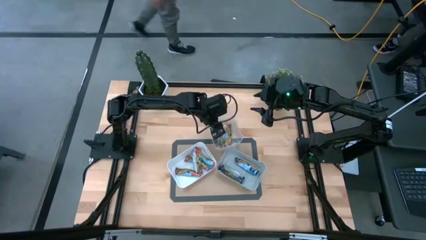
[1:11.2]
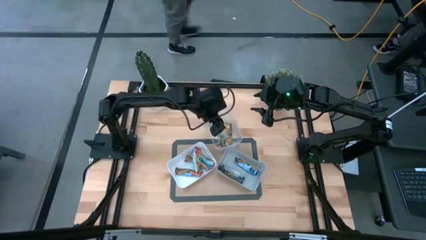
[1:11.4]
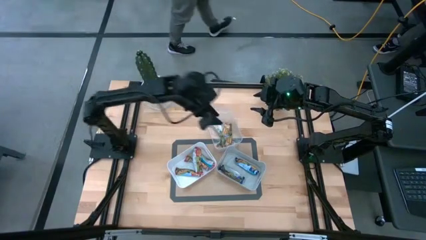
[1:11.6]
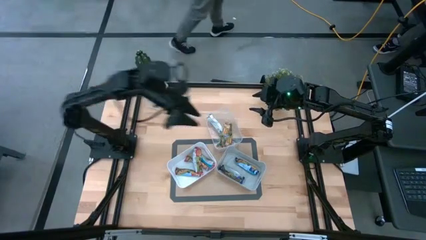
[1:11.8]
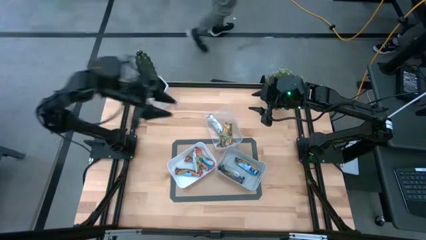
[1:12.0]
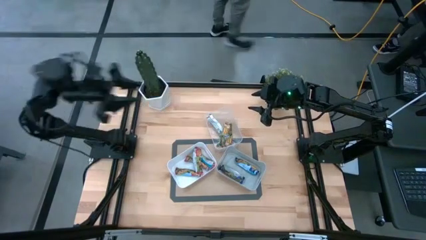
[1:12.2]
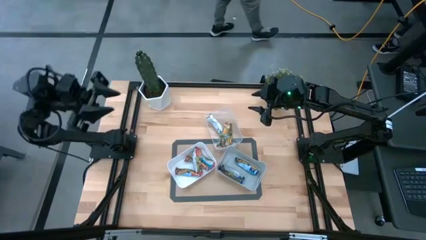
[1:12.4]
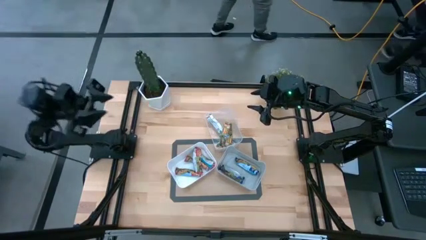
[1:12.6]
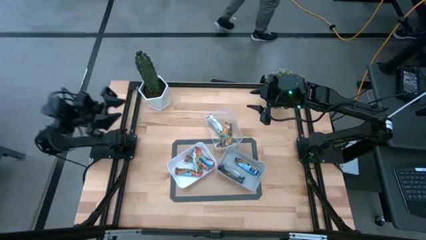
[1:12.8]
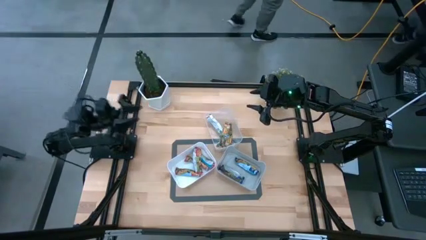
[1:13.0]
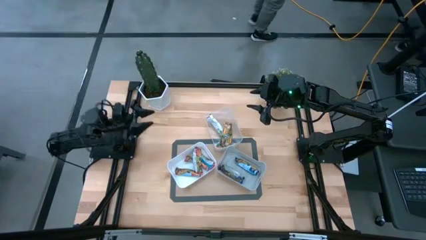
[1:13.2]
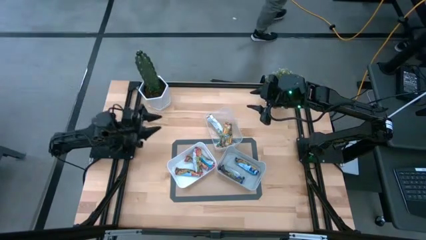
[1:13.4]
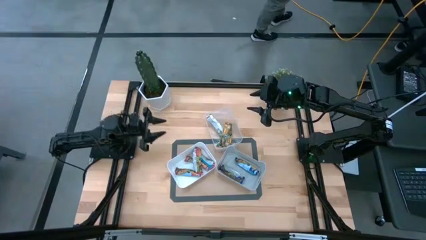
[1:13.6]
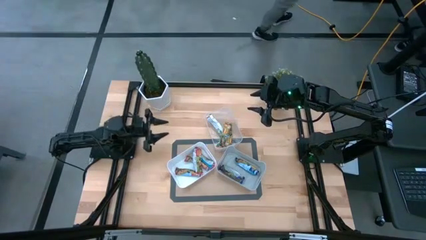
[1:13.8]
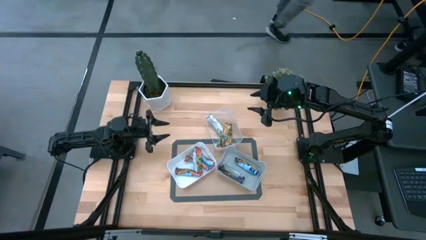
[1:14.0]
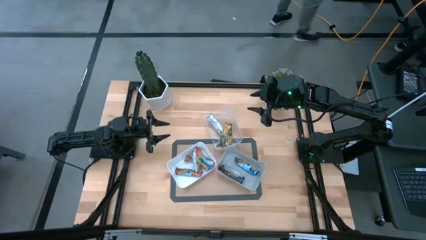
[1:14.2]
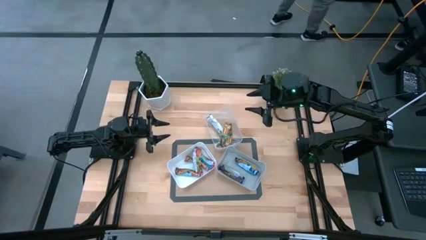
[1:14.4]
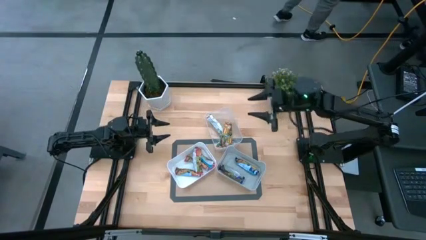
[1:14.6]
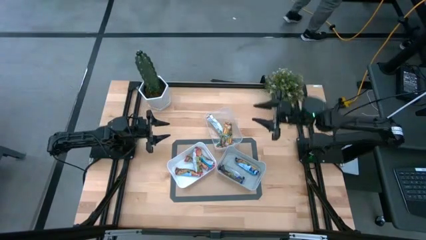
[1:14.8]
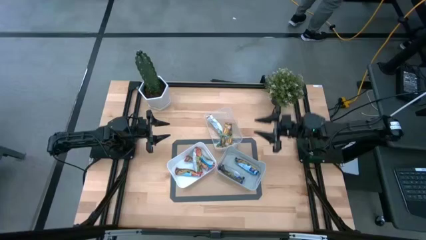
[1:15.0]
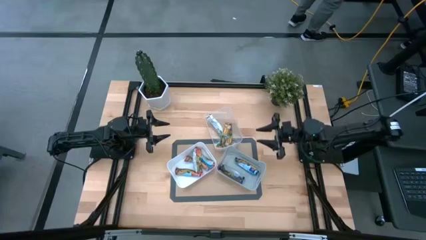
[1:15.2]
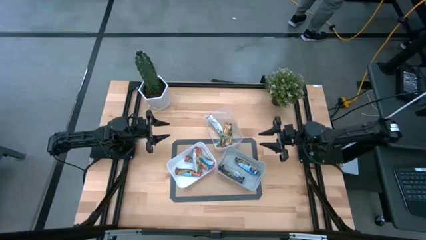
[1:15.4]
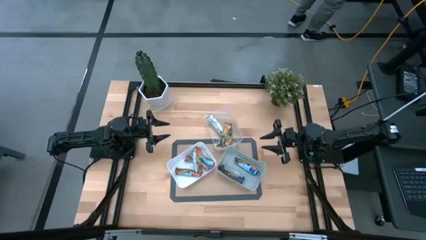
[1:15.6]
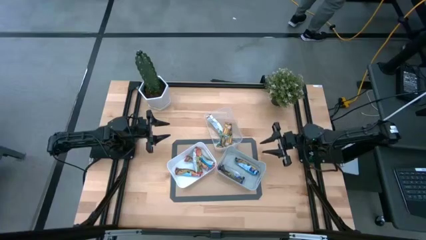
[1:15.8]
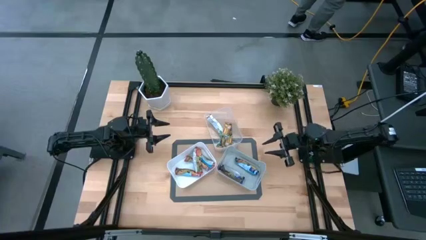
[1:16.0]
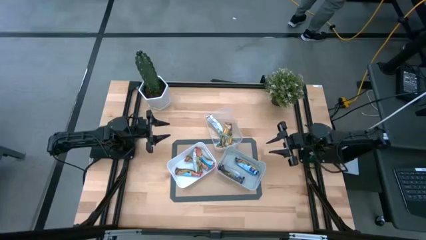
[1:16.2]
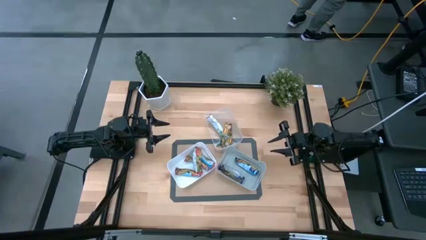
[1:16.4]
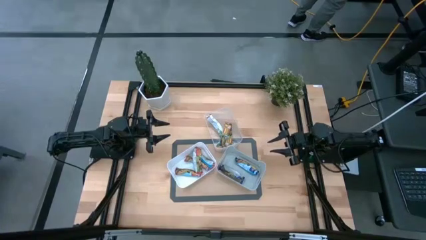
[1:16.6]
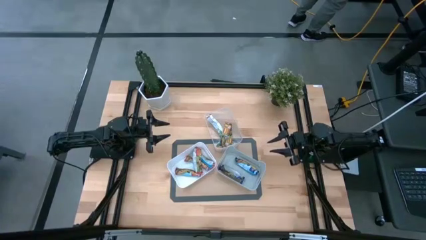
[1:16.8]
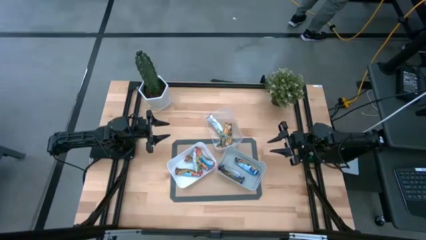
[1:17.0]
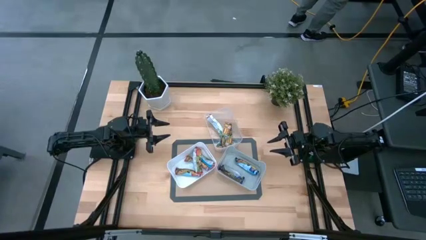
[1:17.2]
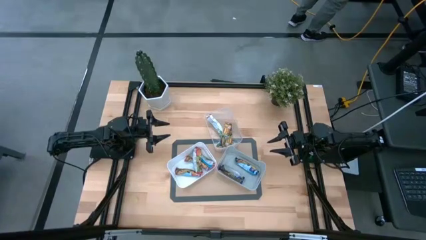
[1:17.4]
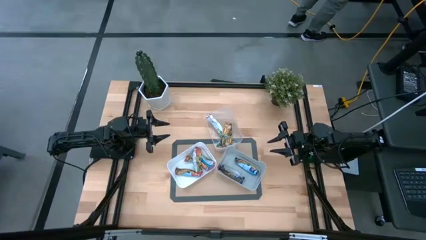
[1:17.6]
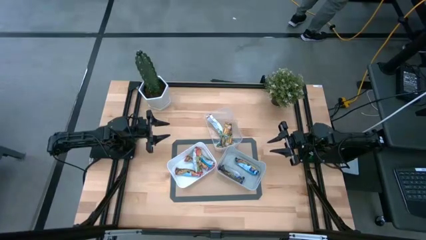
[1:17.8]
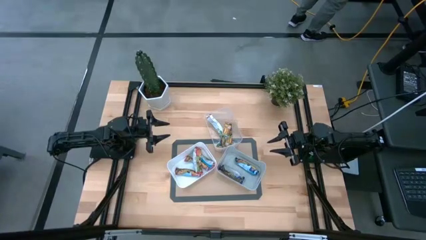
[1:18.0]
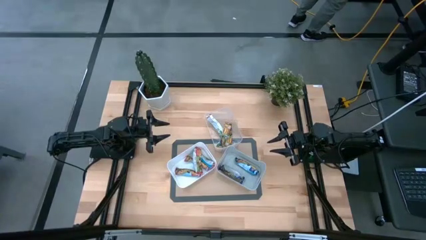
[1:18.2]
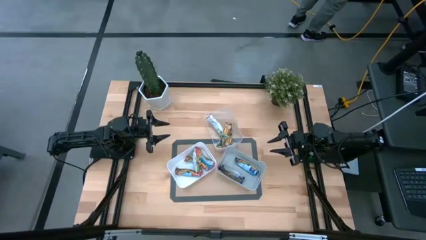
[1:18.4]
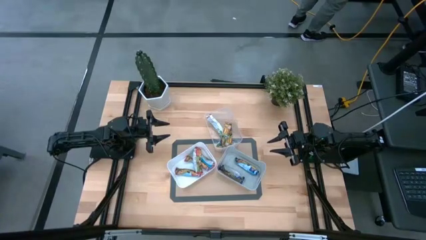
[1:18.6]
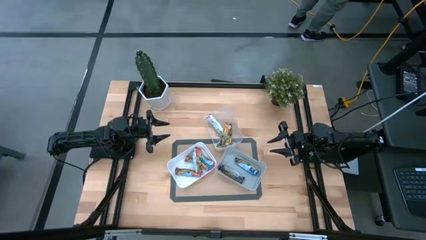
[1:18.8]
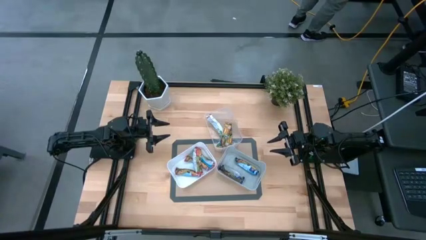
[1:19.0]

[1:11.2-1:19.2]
Task: Pick and place Granola Bars by type
Return to Home Position

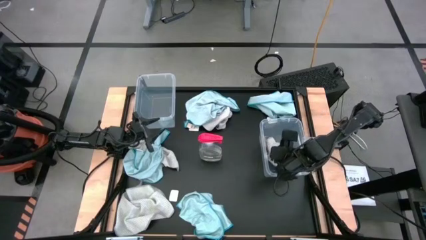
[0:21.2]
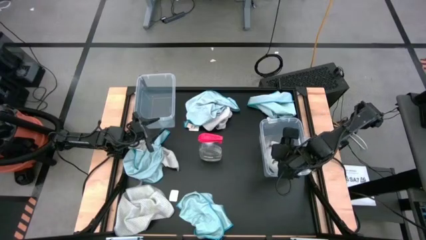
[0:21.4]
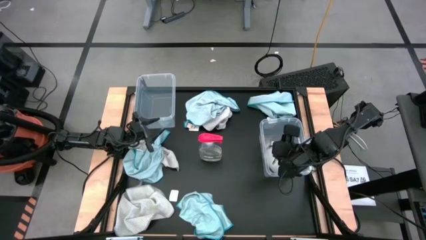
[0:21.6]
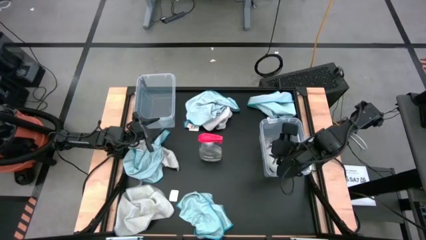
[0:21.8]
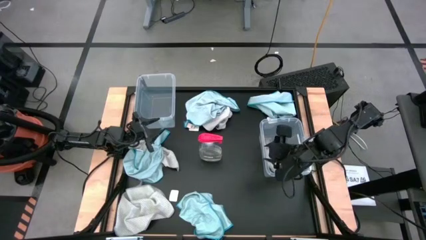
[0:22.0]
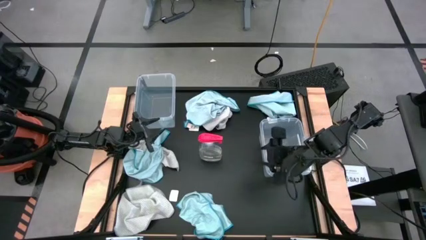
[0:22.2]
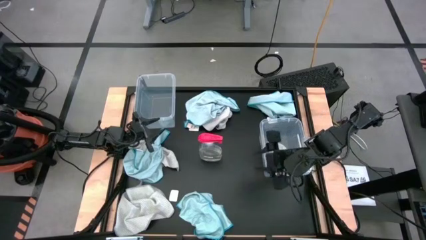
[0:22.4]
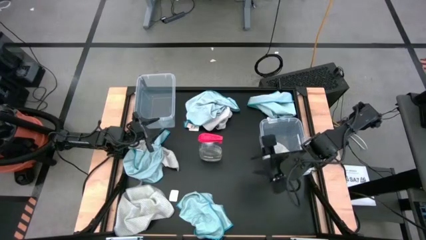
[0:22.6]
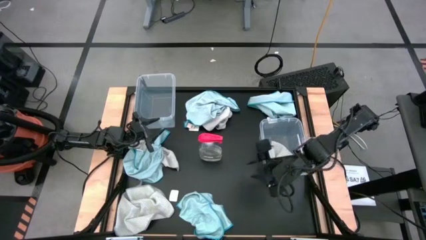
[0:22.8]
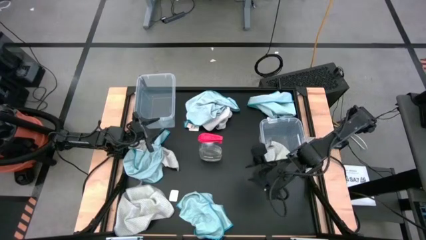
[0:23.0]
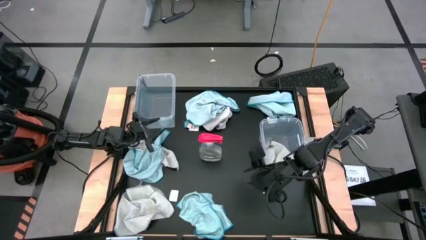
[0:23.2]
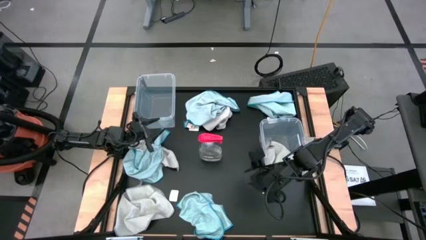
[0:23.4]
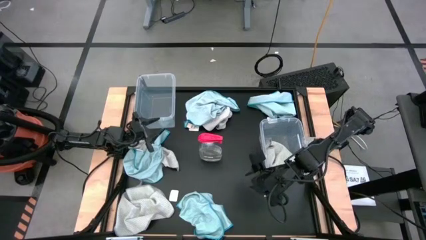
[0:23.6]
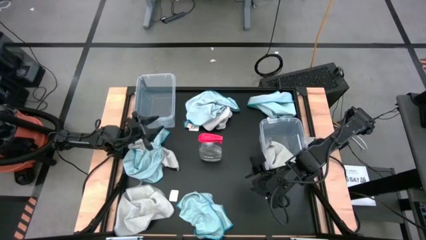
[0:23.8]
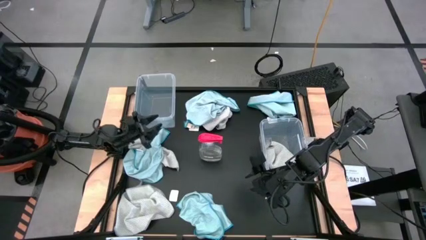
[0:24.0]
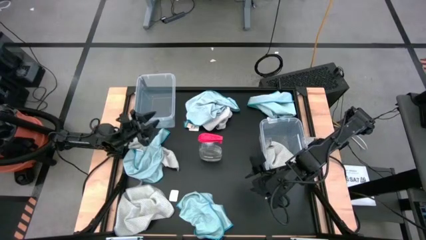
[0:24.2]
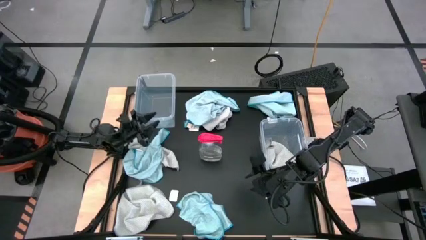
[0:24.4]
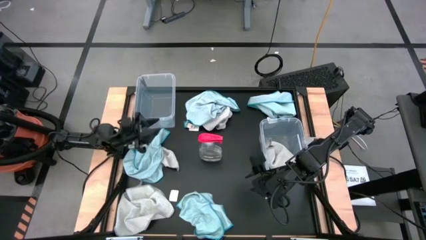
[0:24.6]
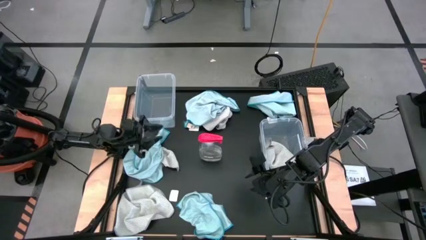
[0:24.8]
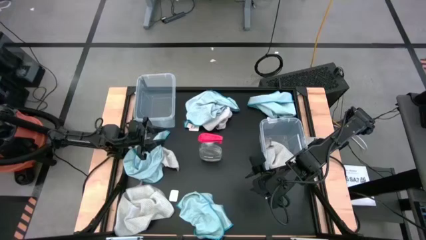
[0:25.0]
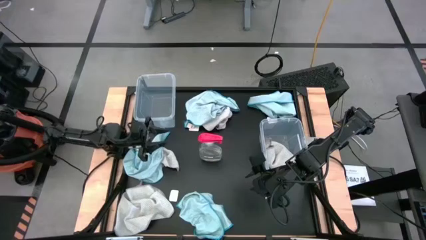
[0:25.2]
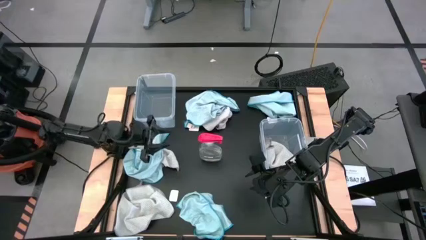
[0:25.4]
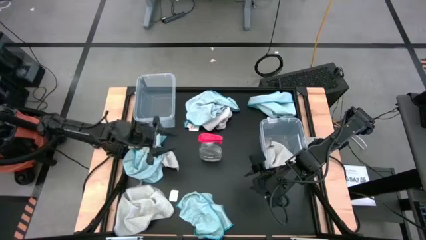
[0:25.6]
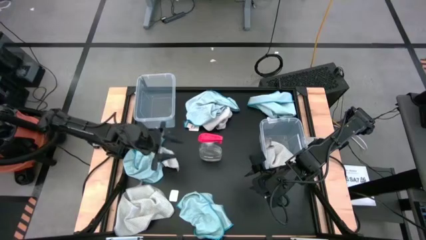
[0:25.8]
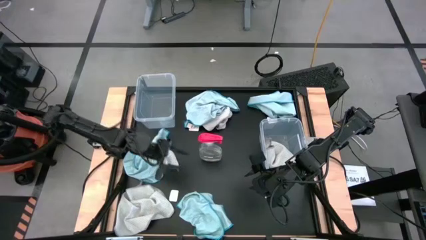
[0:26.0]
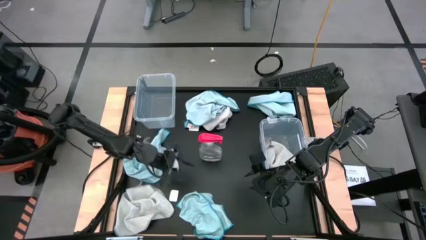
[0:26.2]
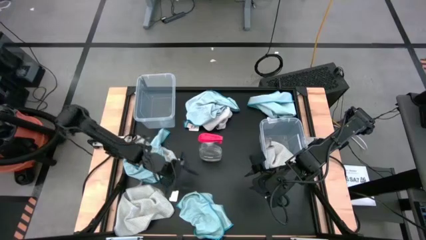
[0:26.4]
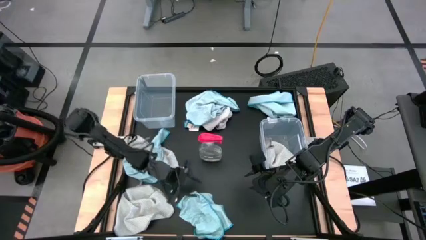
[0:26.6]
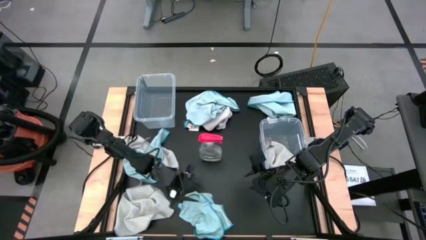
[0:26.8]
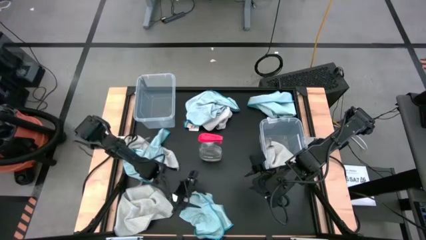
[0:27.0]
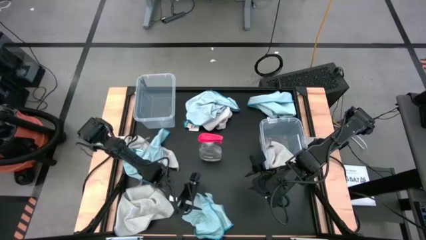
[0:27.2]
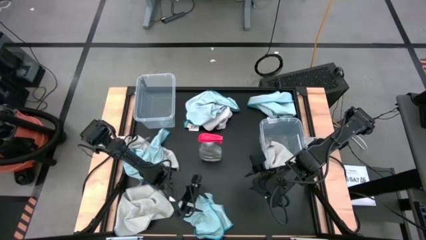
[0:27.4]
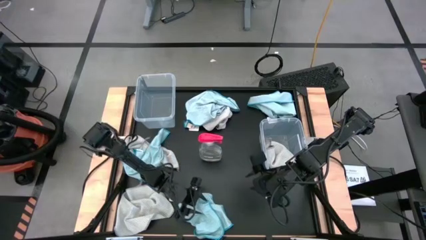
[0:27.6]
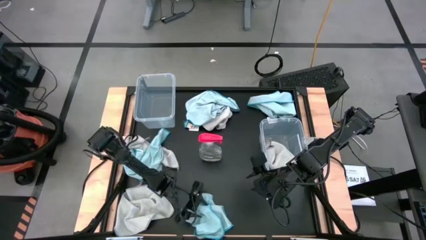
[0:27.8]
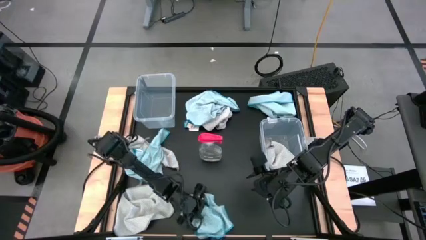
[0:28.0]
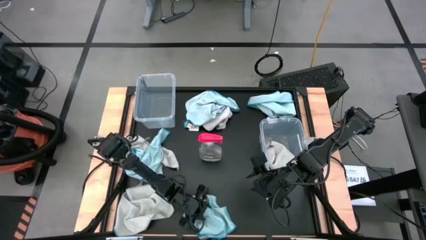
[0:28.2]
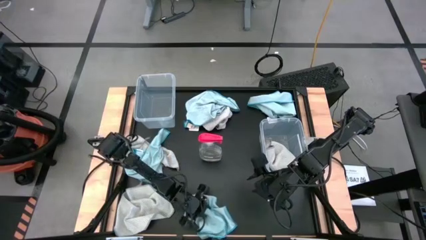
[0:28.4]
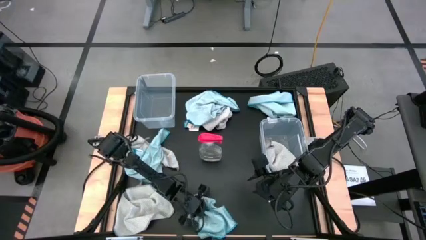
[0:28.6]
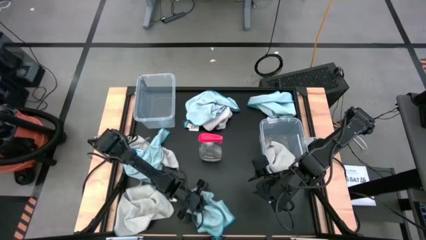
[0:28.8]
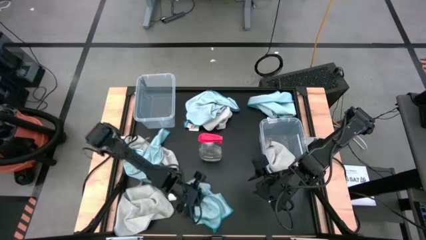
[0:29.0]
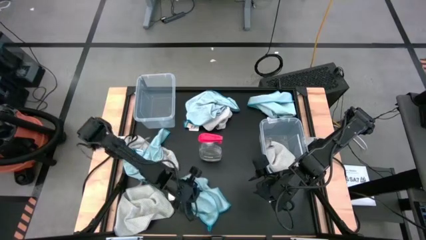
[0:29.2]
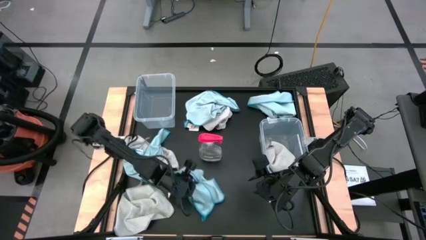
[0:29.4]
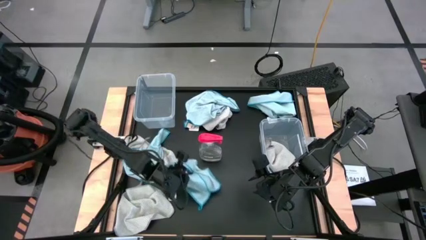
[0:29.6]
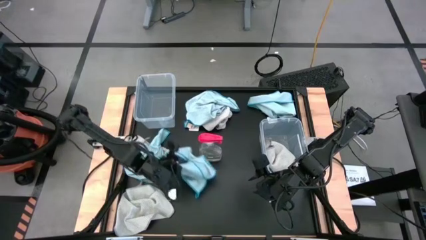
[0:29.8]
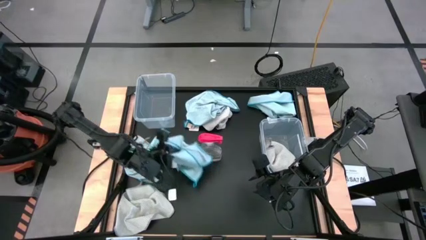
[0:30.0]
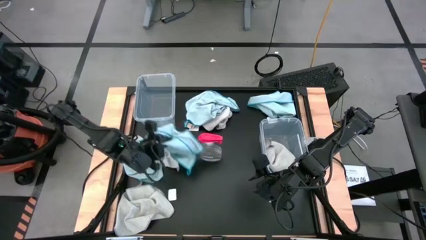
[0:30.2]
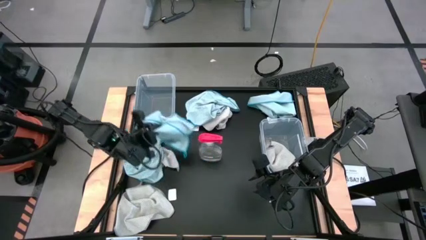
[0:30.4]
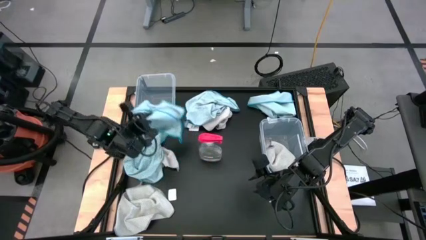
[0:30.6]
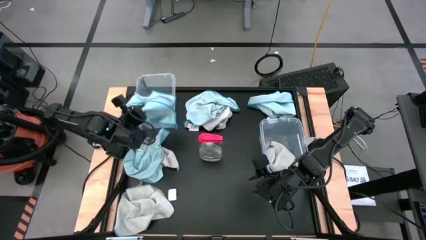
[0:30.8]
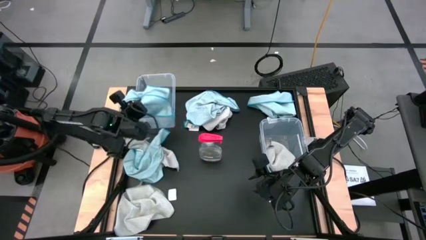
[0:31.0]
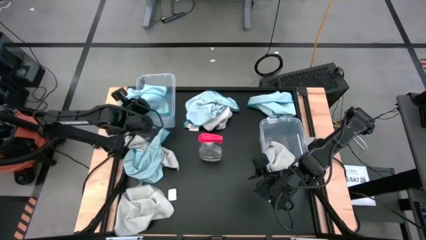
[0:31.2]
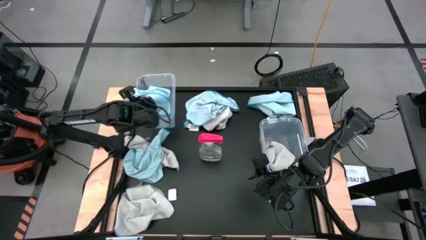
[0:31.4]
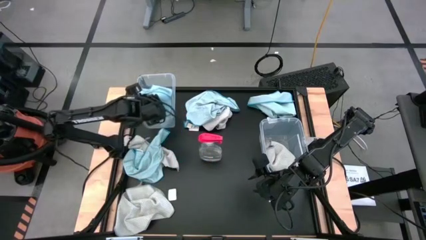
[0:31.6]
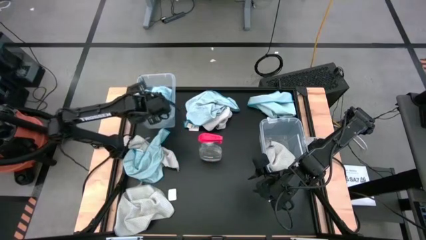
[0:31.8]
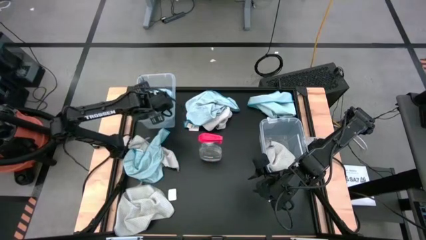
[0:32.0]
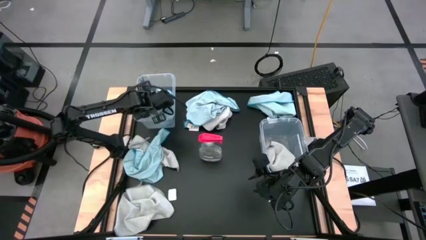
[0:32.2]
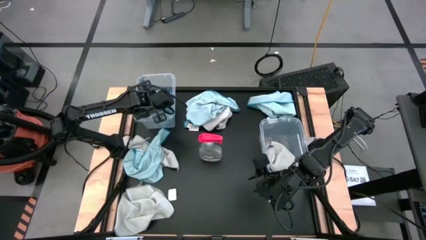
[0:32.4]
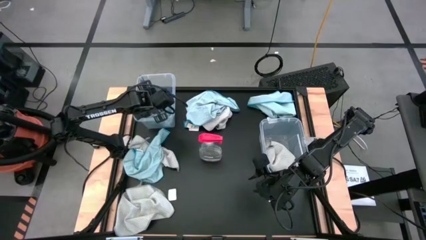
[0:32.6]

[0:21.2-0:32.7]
Task: Sort microfiber towel by color & place in baskets
Put the bottom blue towel into the left transparent bin
